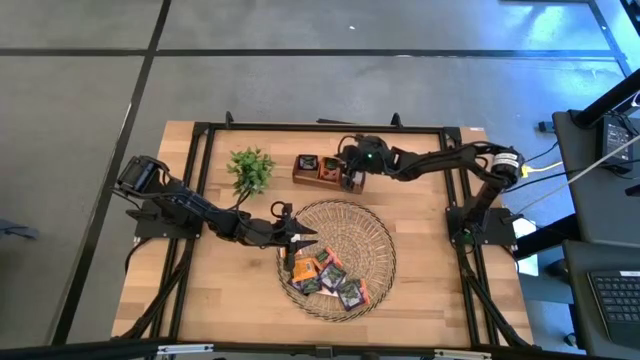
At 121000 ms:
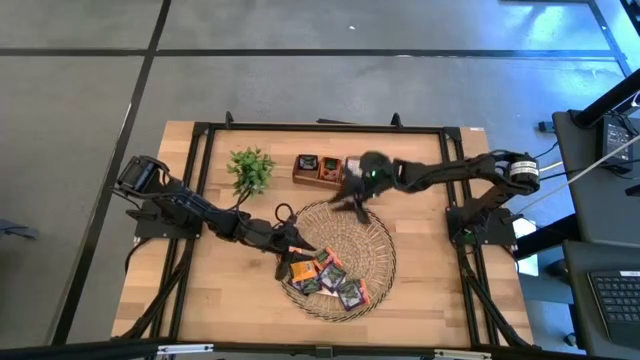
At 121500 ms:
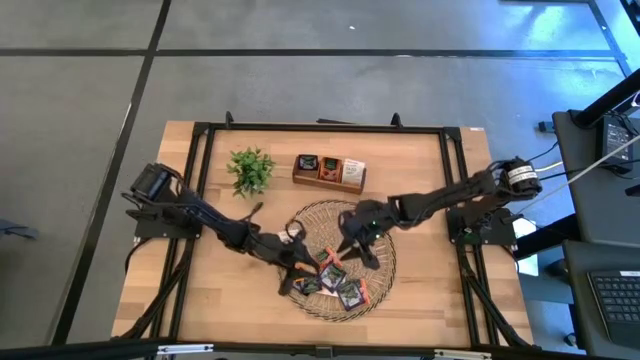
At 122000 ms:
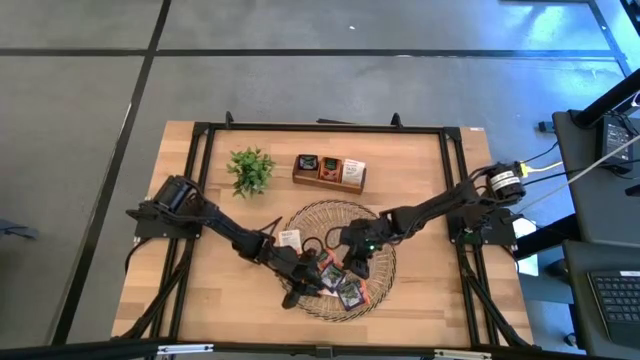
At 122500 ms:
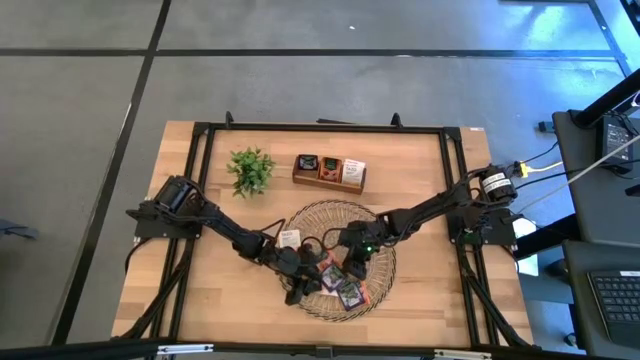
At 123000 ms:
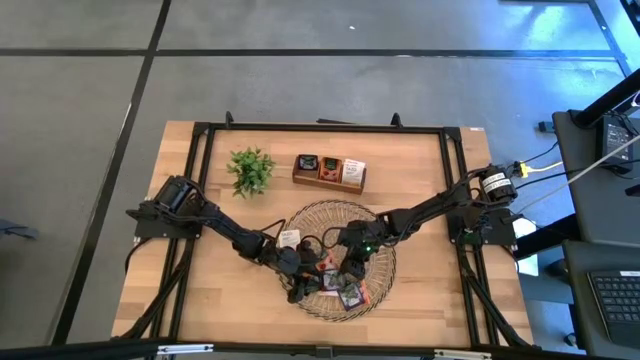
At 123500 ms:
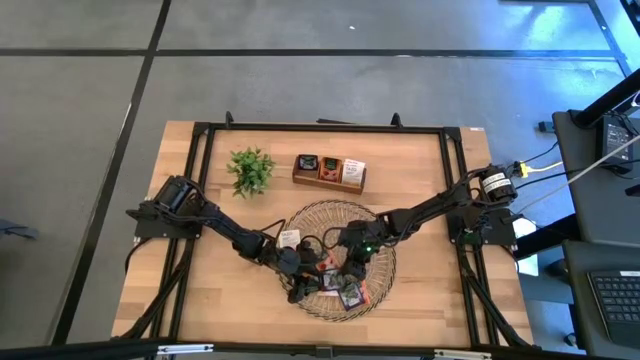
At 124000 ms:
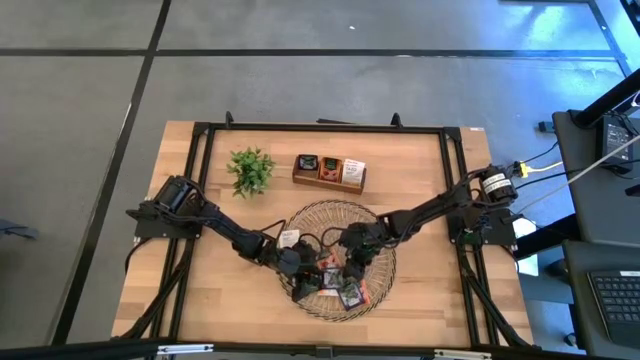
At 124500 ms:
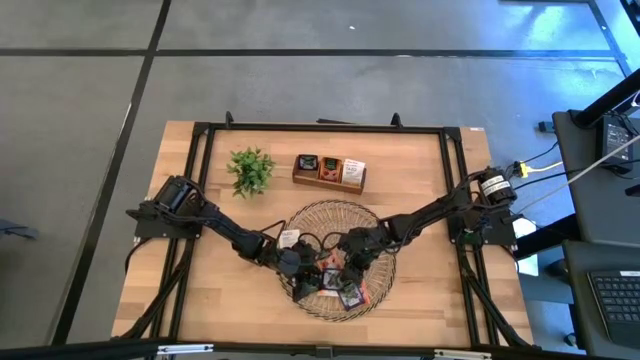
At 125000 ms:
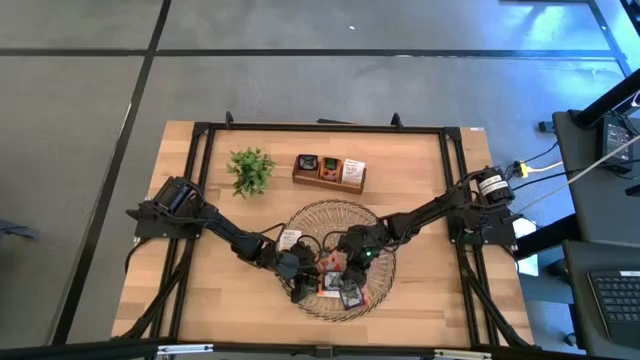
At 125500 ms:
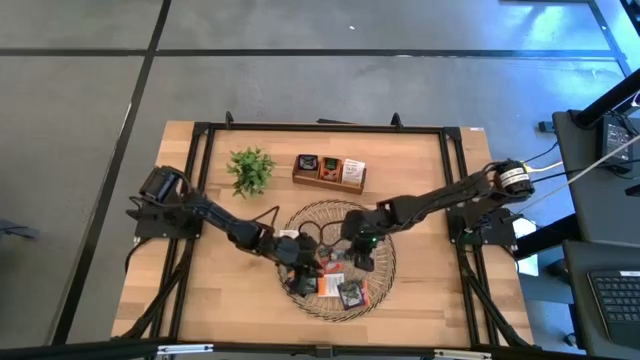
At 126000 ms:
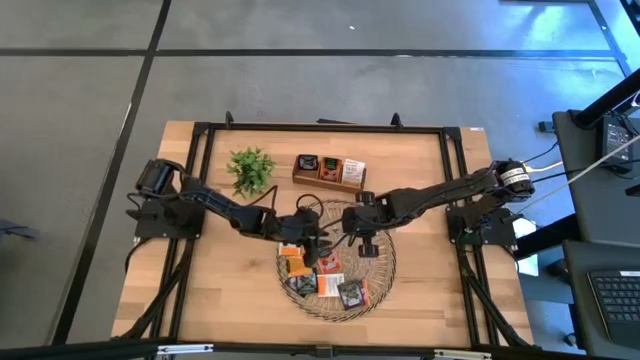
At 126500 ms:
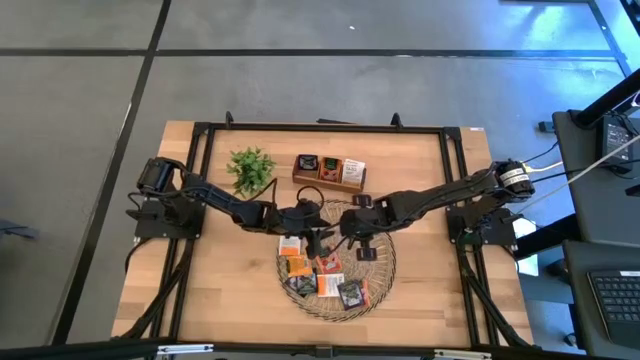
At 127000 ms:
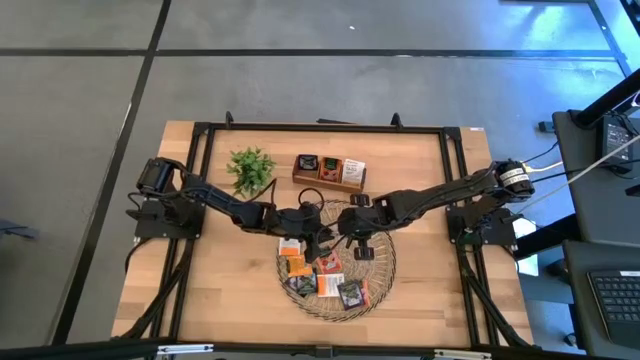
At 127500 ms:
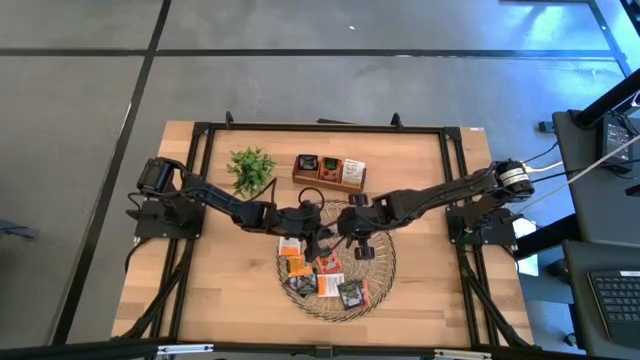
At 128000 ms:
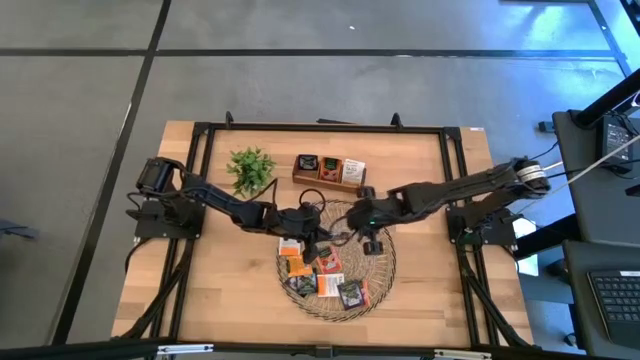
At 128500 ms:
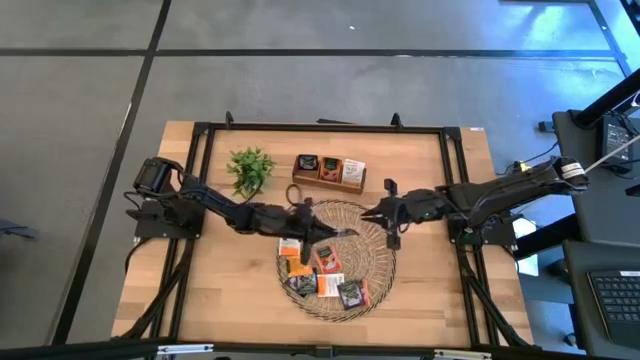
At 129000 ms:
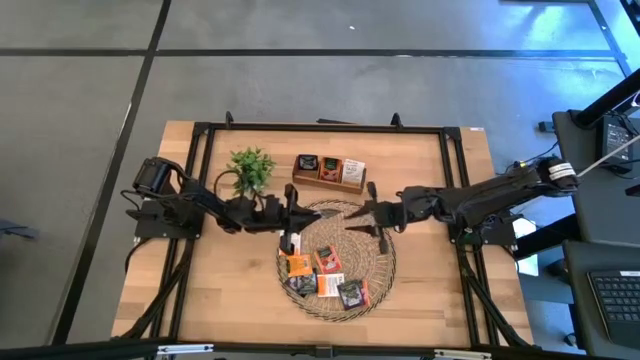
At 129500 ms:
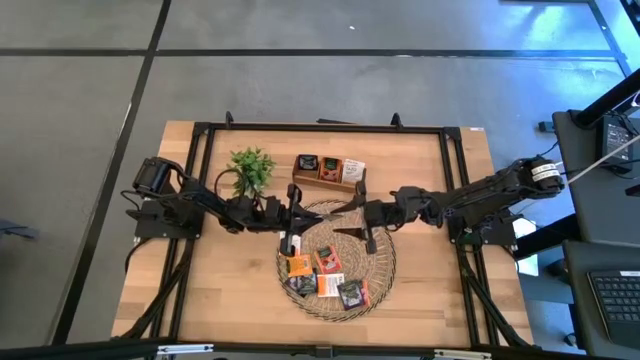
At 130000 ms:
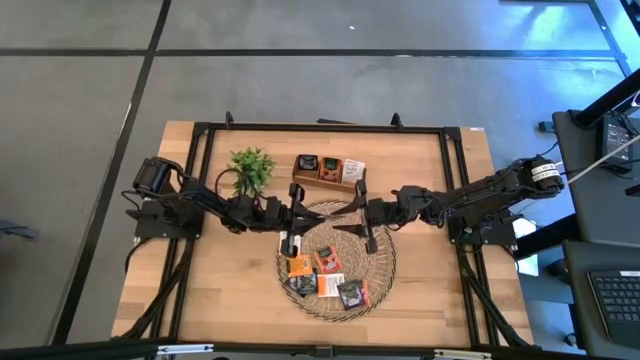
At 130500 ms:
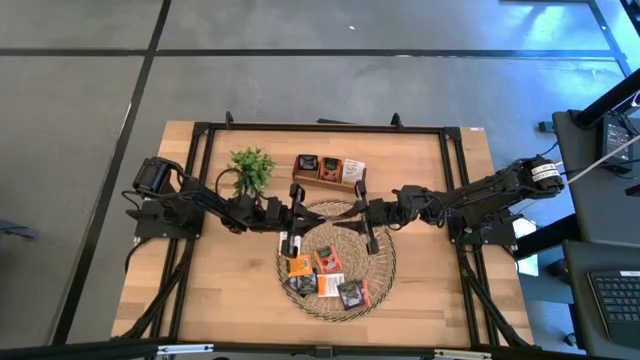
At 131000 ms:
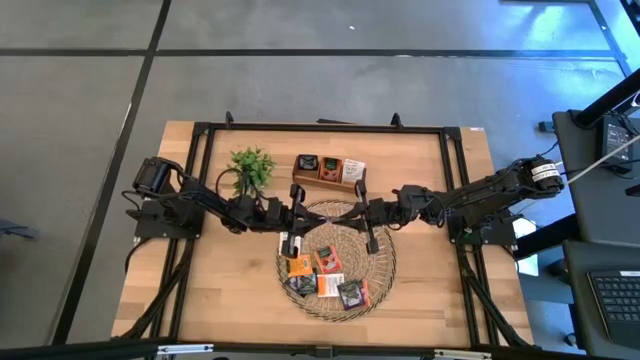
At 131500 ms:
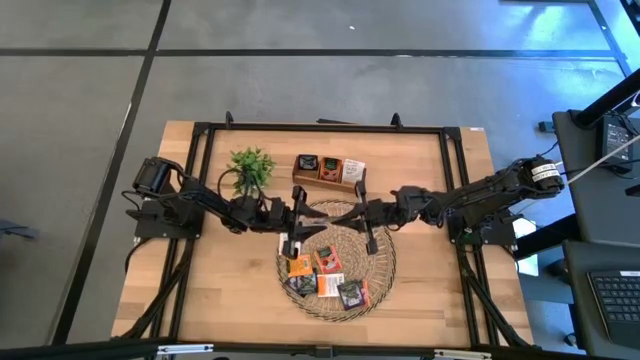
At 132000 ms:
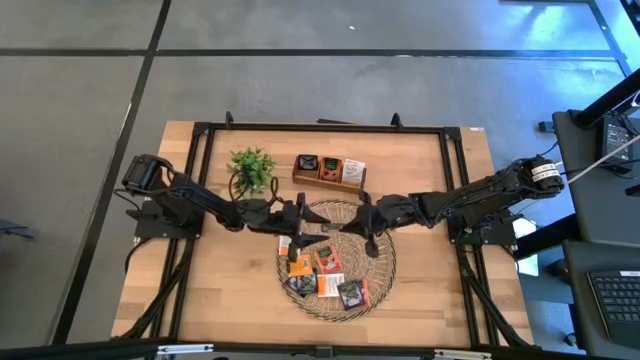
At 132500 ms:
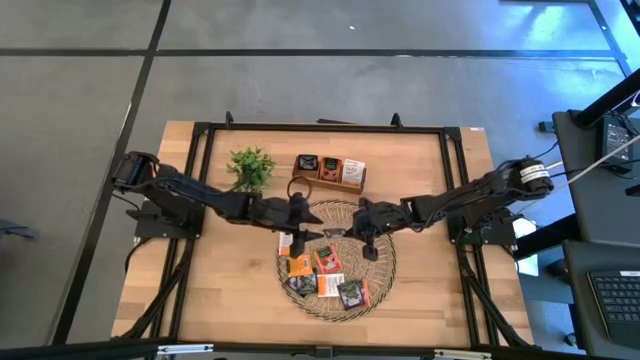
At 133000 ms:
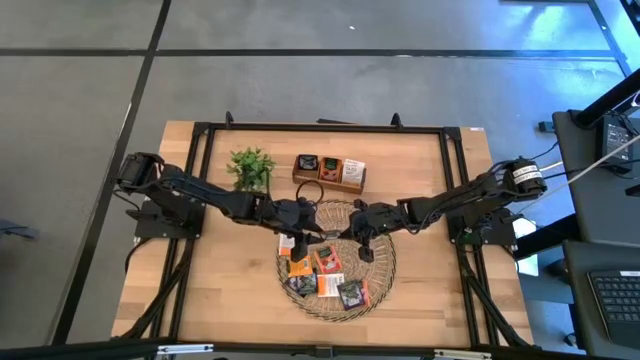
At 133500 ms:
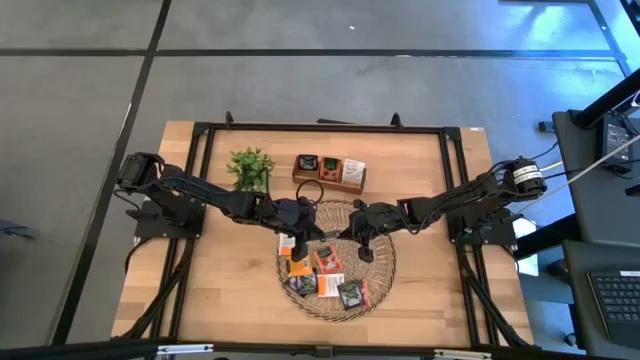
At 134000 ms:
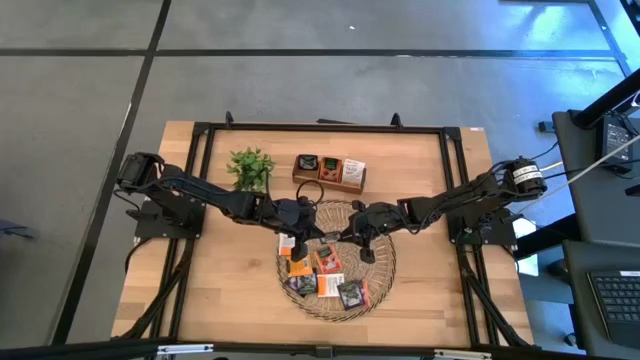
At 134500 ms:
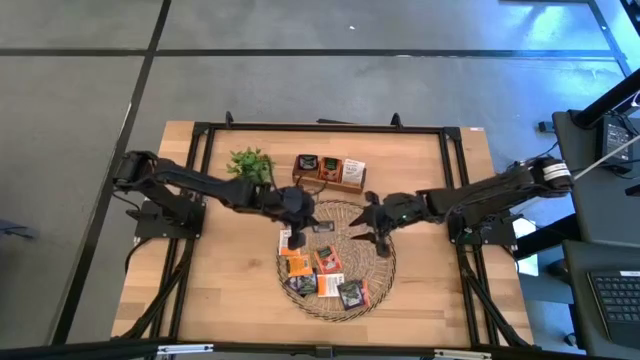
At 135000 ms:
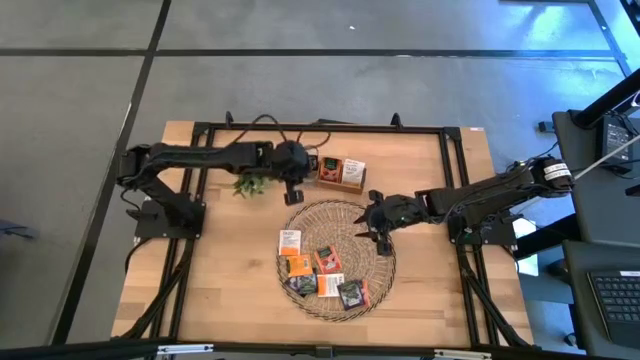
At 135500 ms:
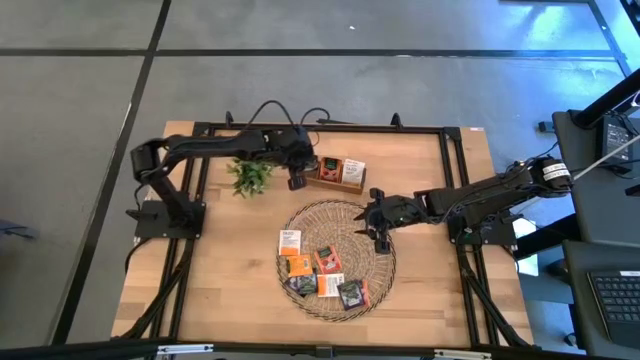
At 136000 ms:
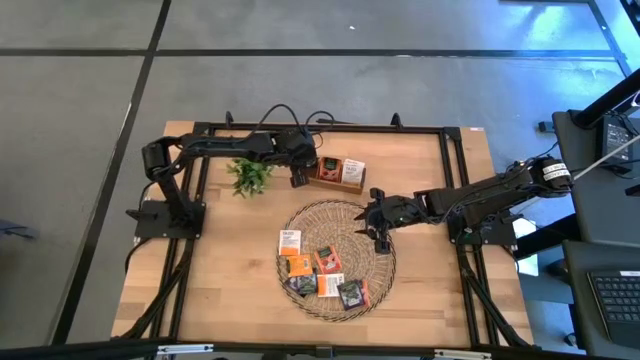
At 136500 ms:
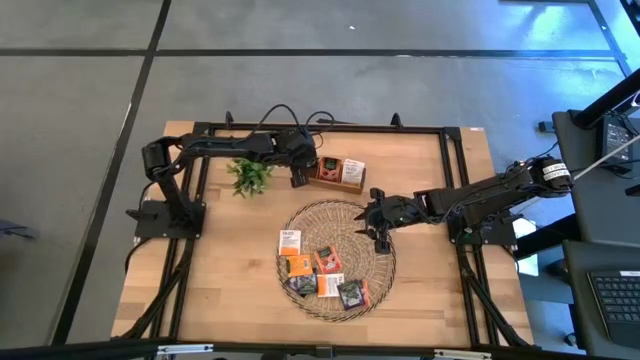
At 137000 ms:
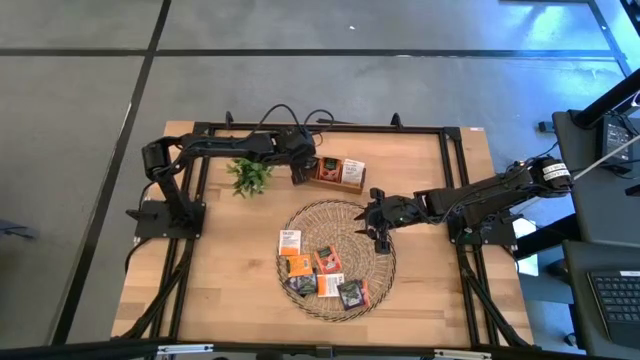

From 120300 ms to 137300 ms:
Task: Pick & Place Tea
Put the black and white tea bag into the left section of the wooden organizer

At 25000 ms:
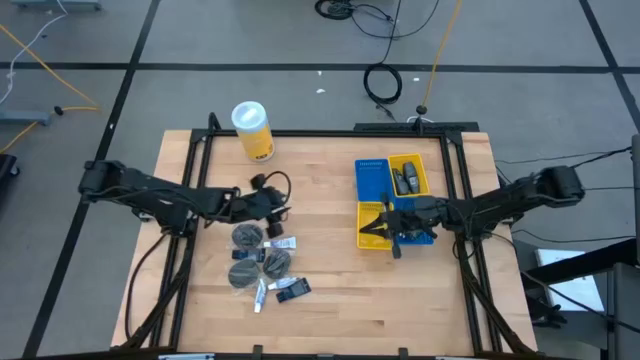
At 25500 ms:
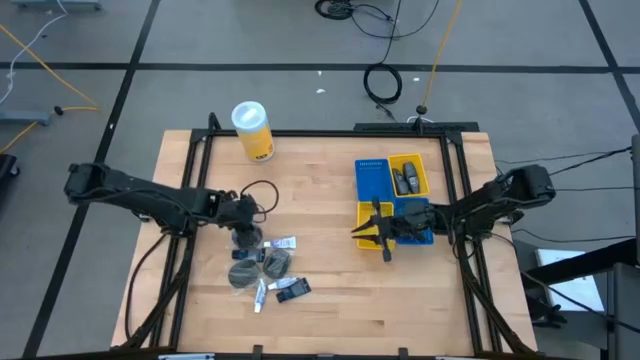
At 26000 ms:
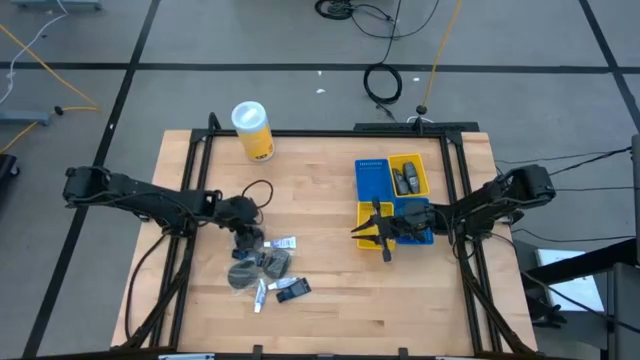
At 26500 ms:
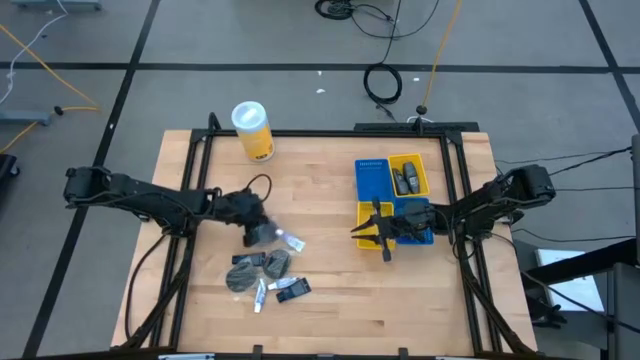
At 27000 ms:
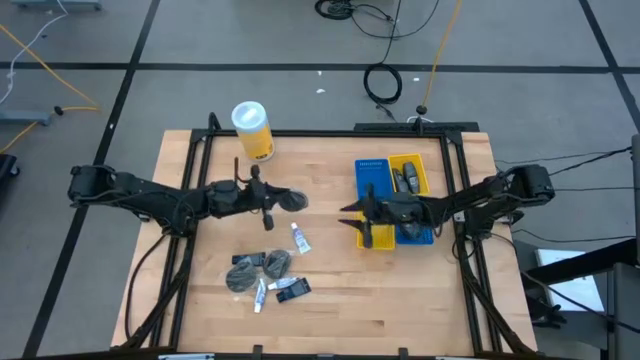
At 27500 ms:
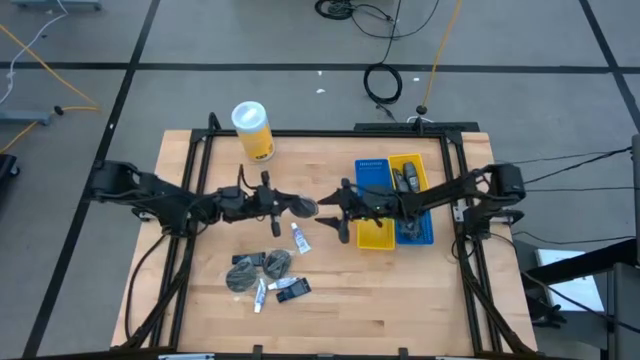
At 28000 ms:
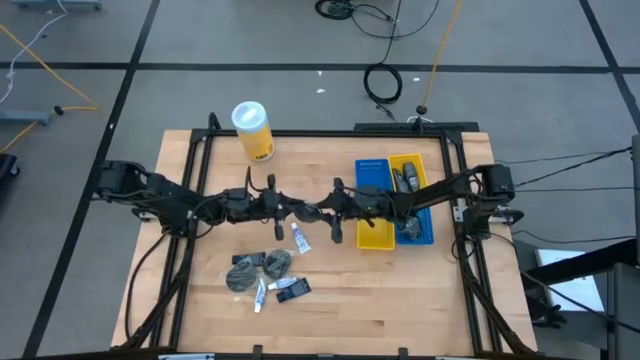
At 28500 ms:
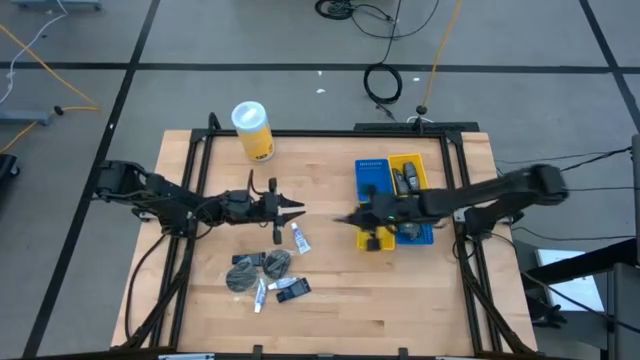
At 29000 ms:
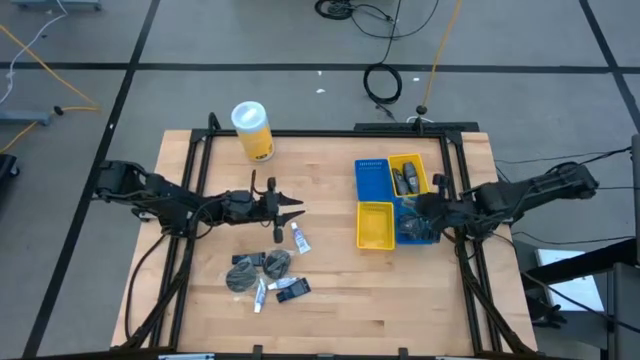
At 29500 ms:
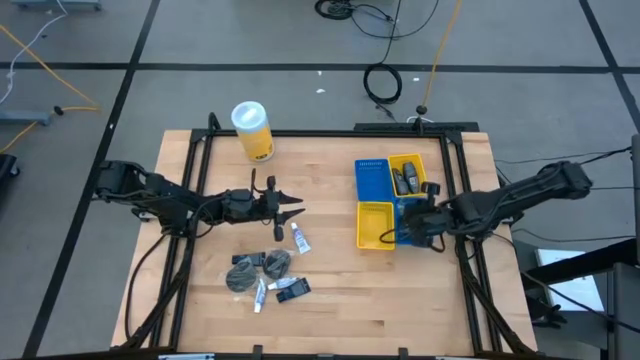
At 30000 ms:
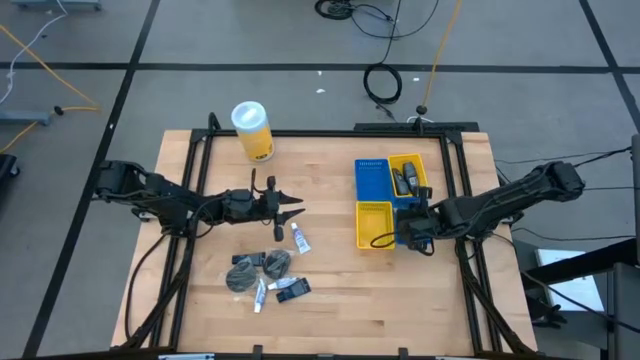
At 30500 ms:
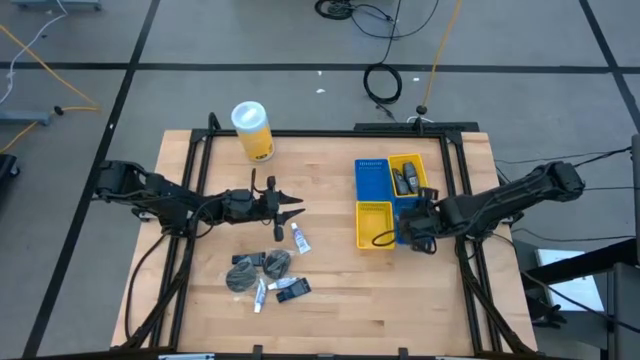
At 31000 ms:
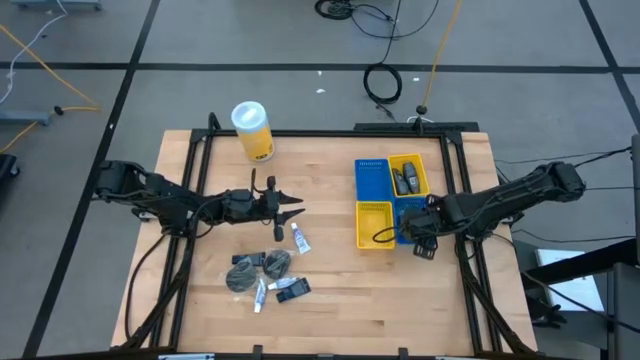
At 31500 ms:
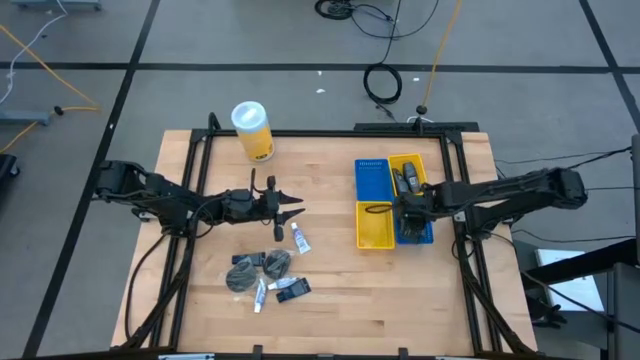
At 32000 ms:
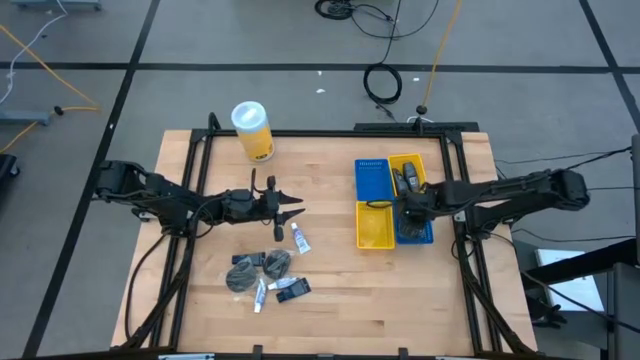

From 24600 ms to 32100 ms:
Task: Pick & Place Travel size toiletries
Put the black hairbrush into the bottom blue bin
